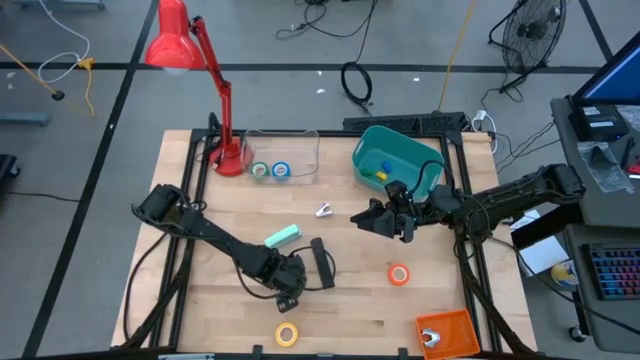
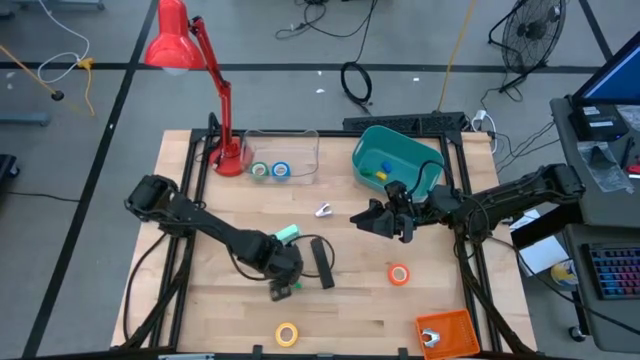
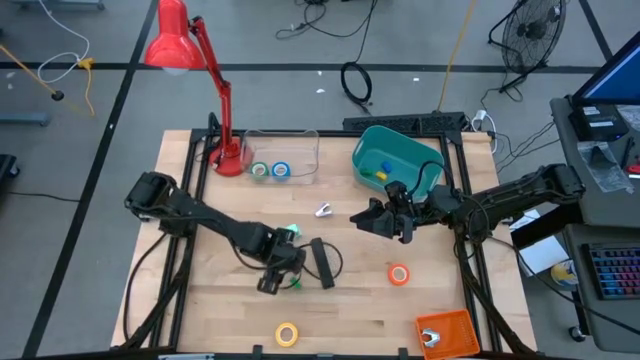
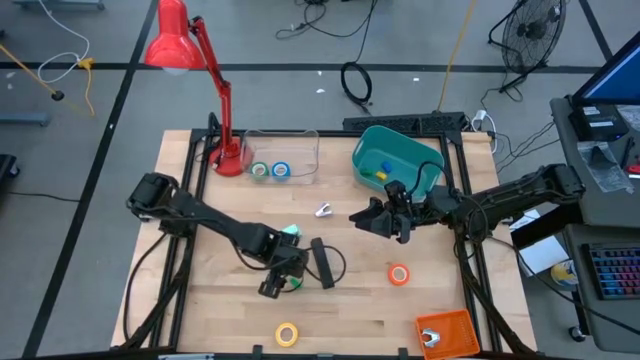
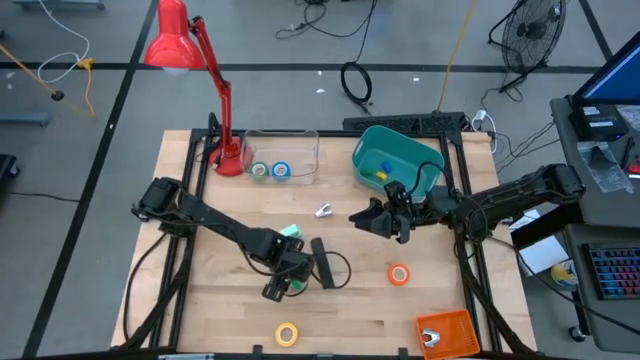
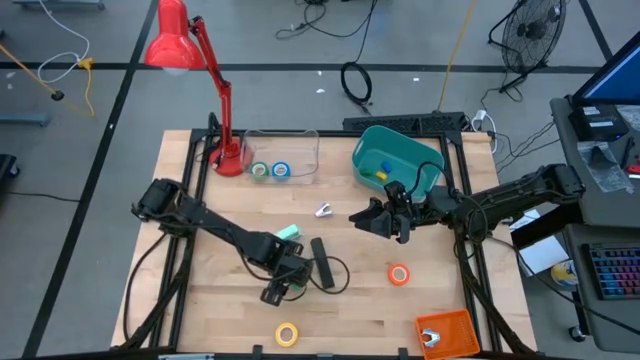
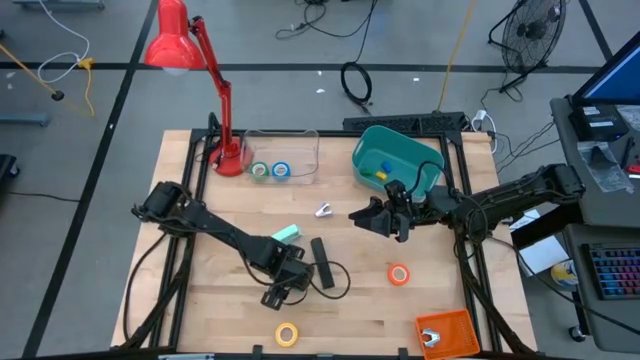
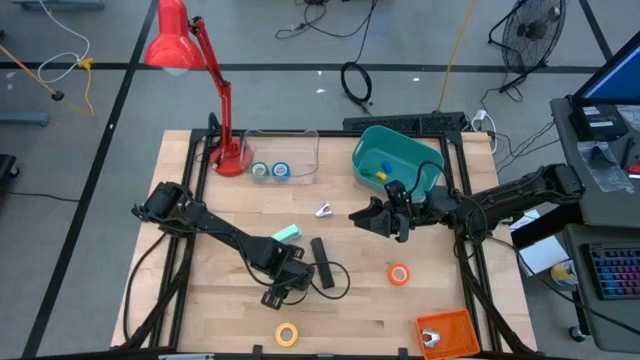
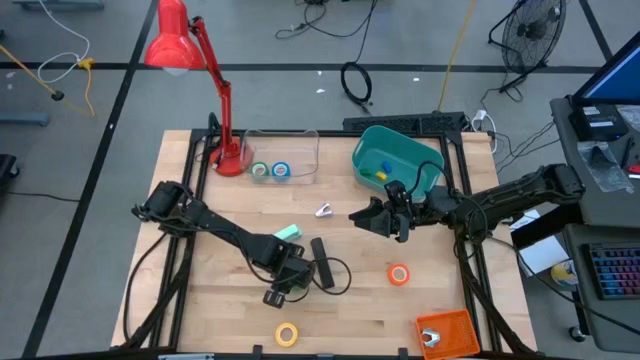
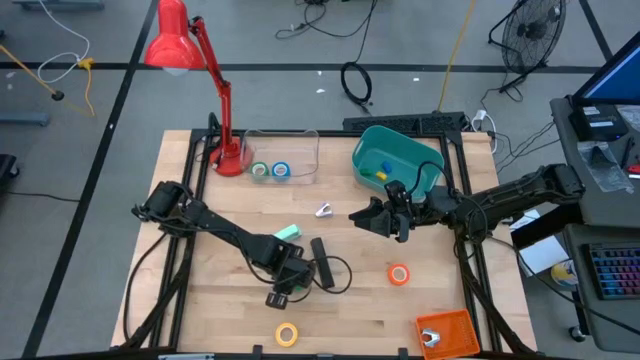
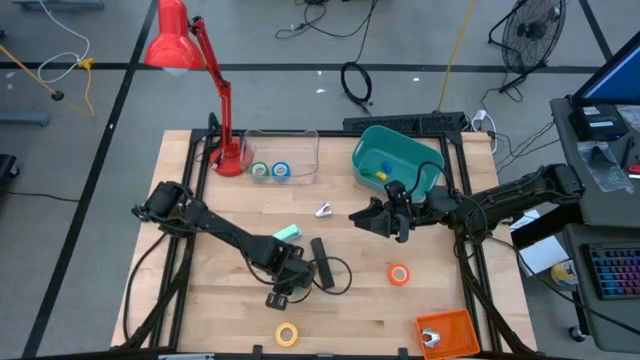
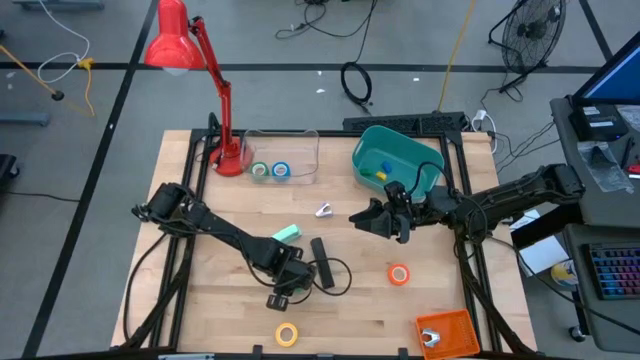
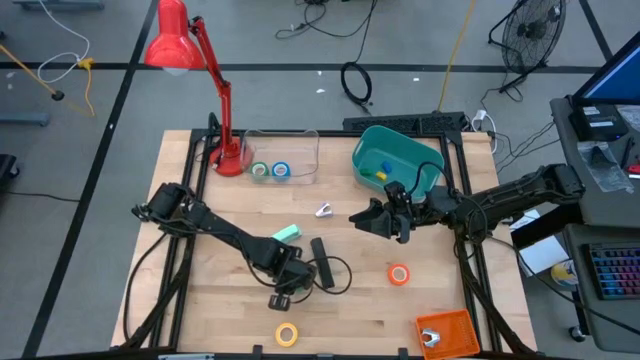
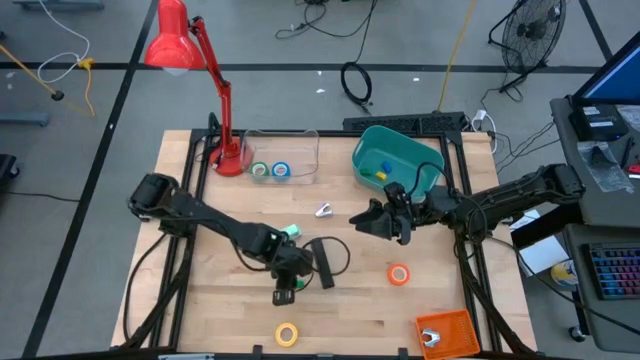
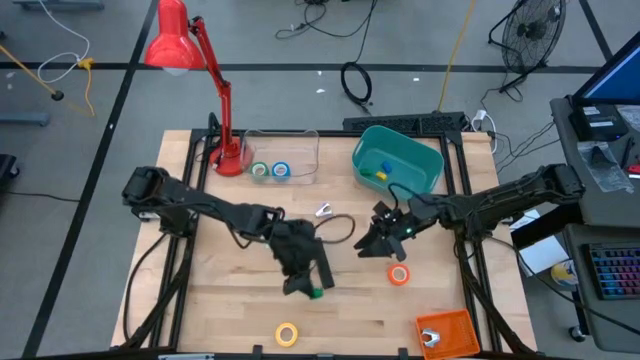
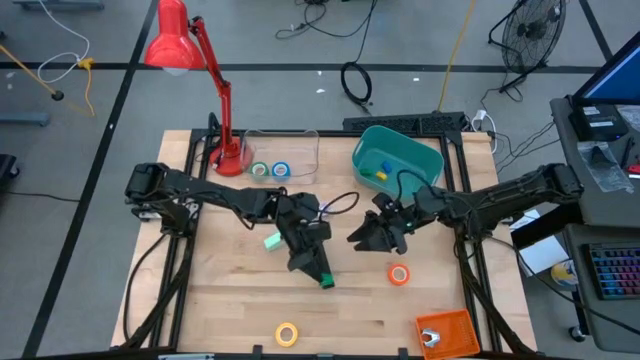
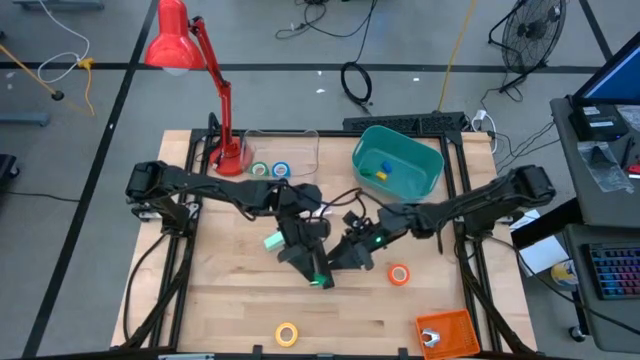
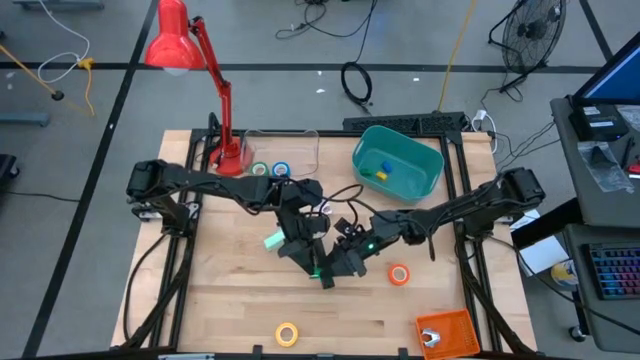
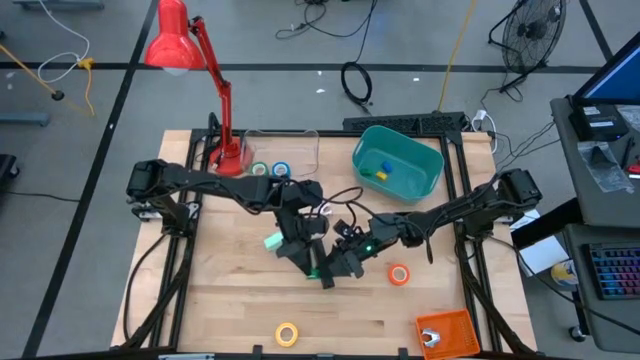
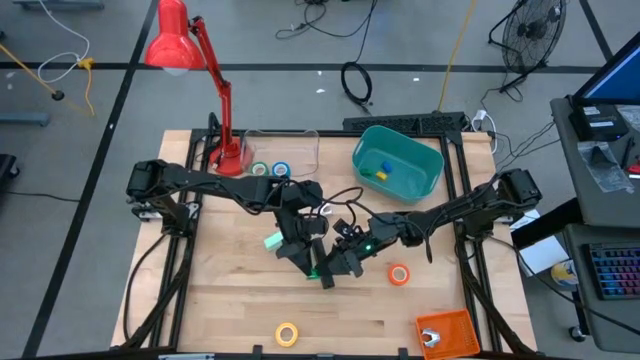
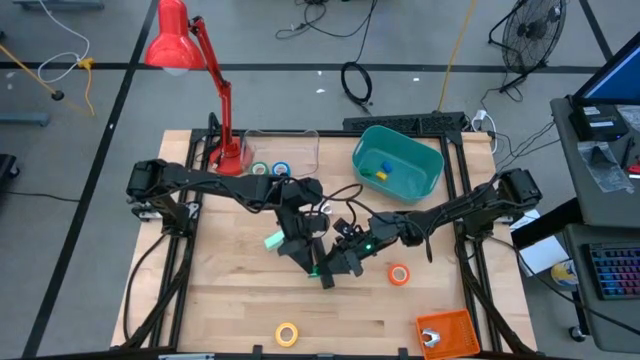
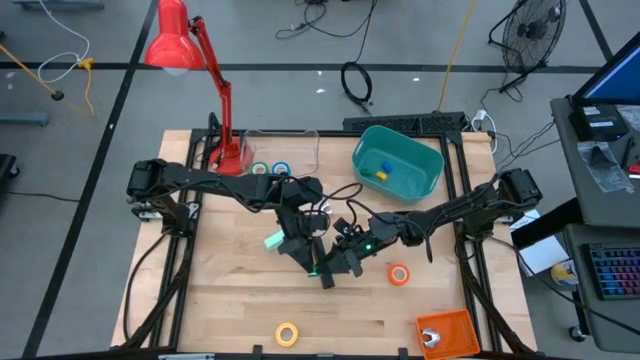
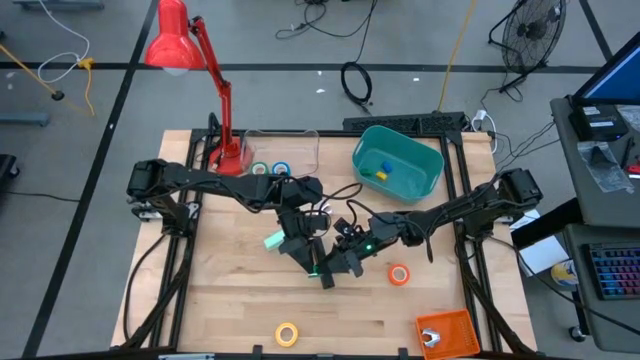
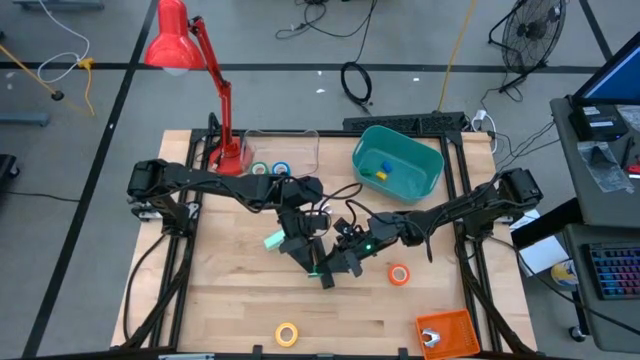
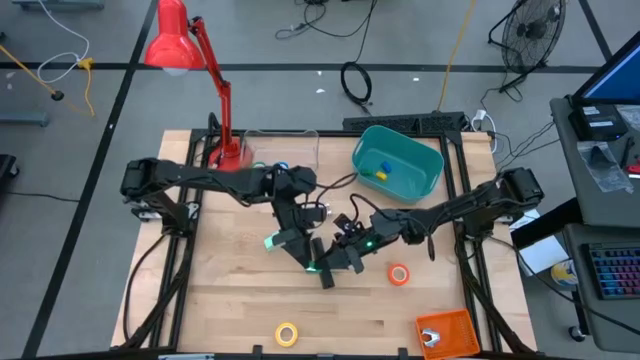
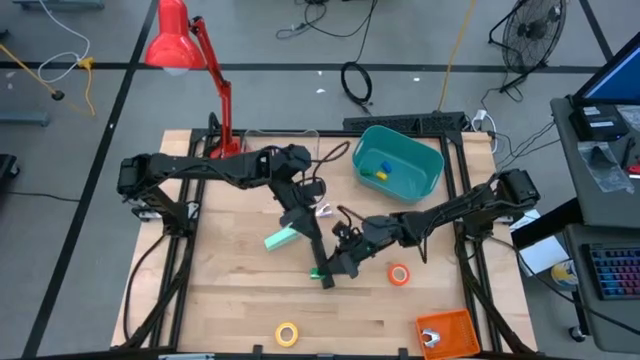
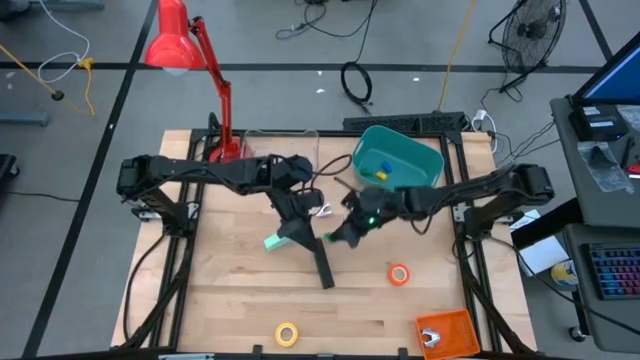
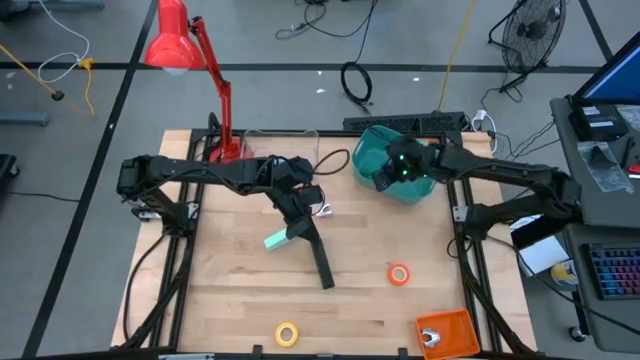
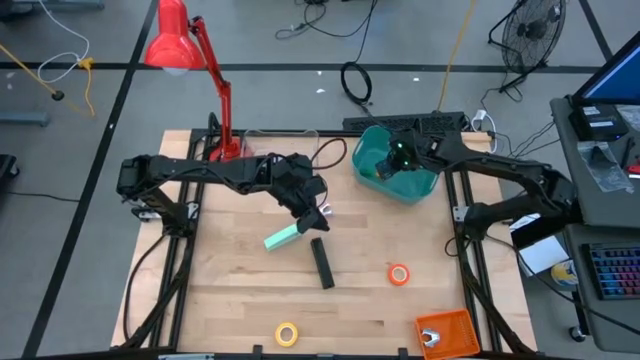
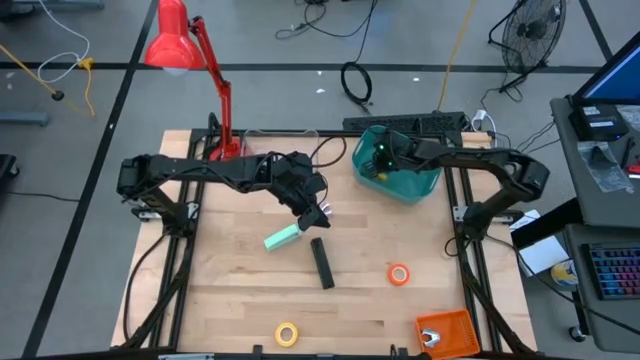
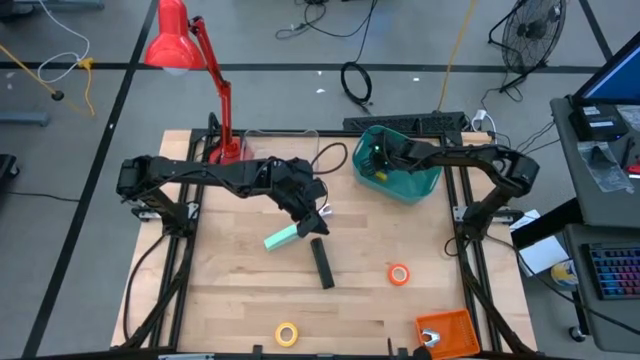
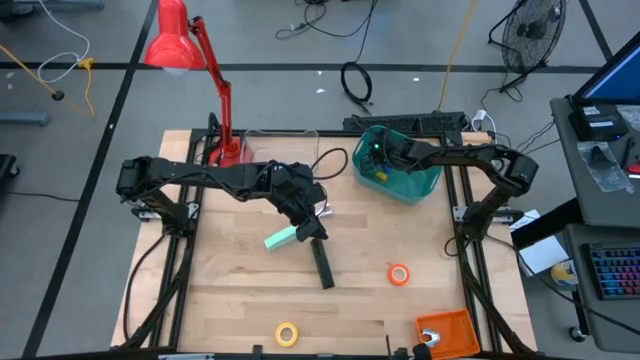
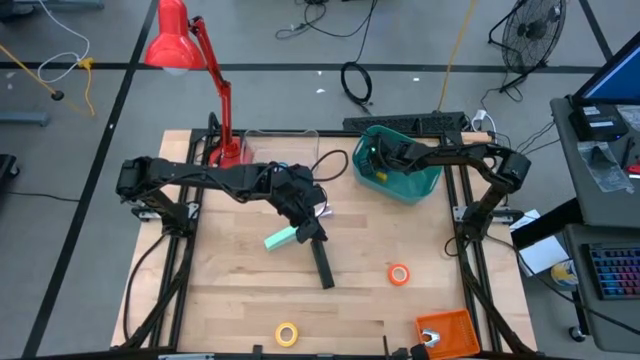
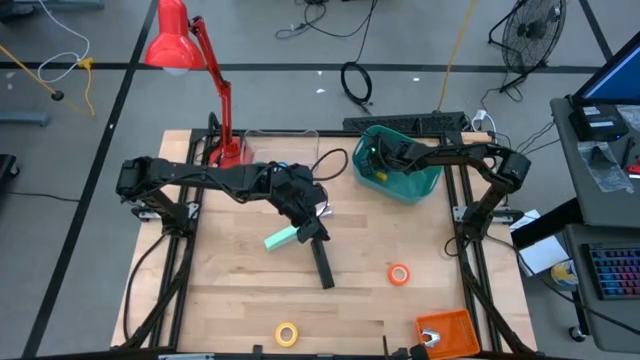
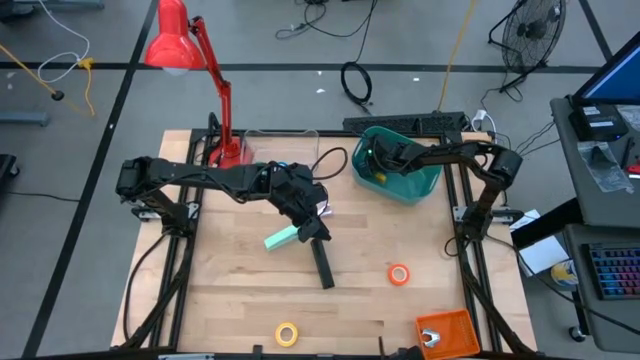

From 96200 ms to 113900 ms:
Task: Pick and place Stapler, Stapler remover, tape
Put the green stapler into the green bin

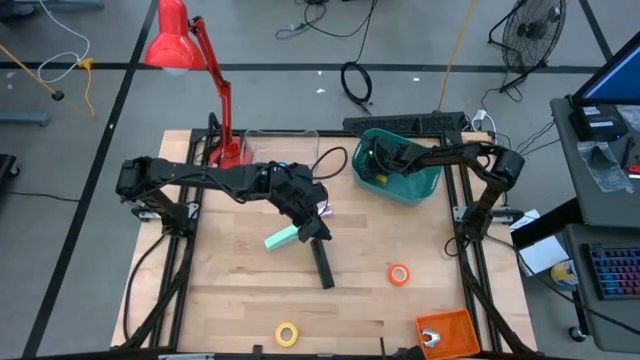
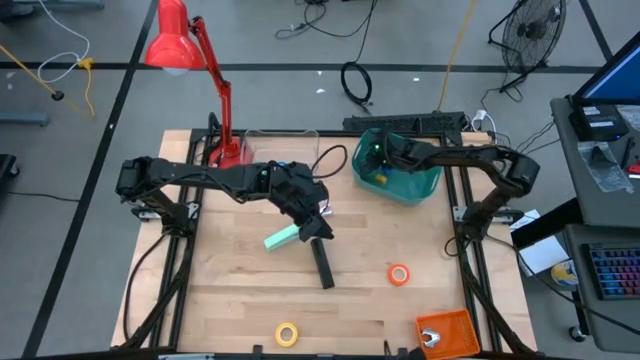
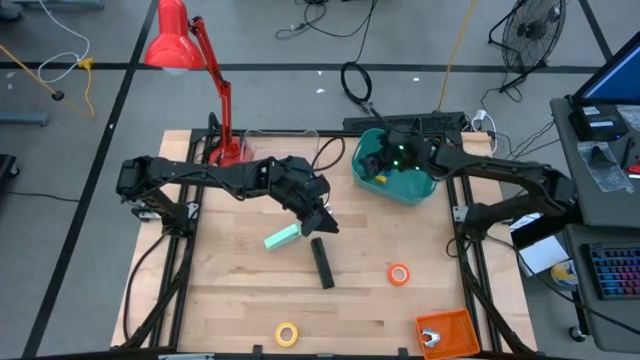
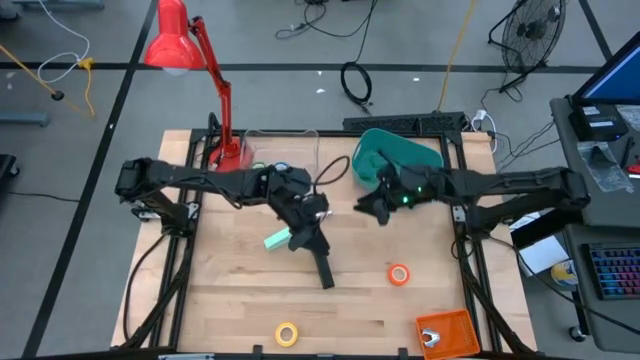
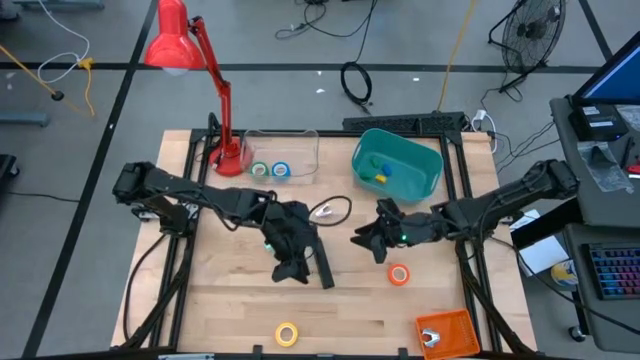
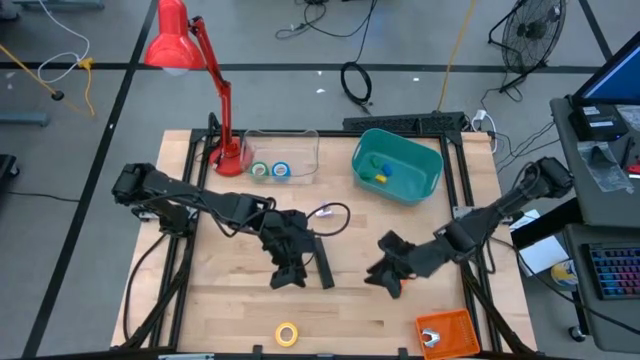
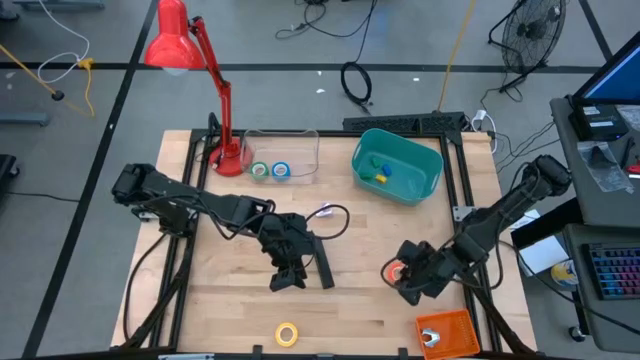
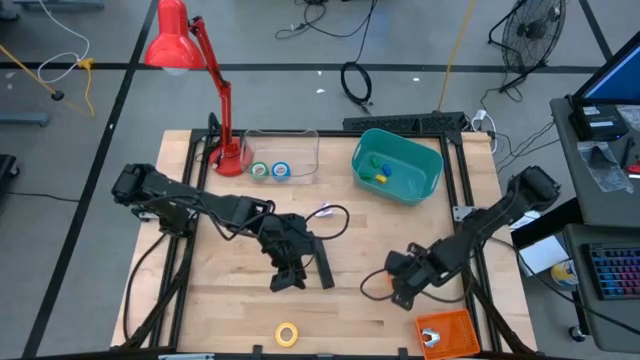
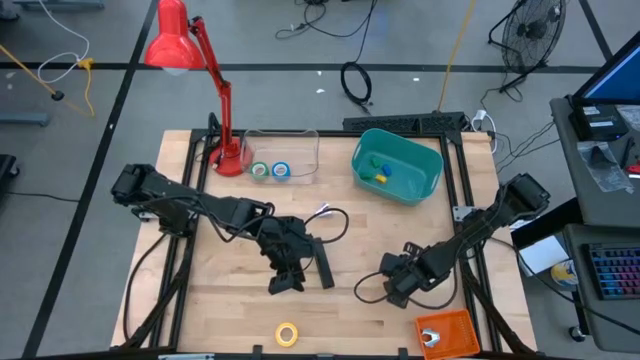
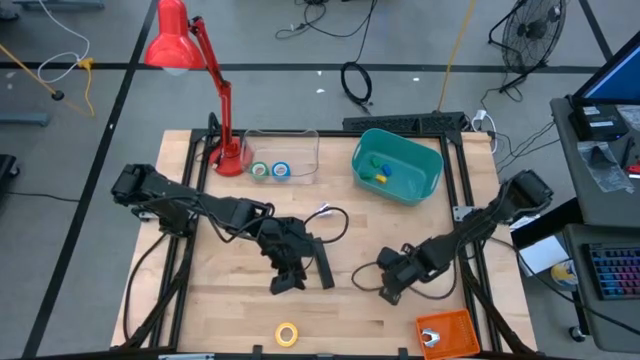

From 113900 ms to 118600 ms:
Put the orange tape into the transparent bin
